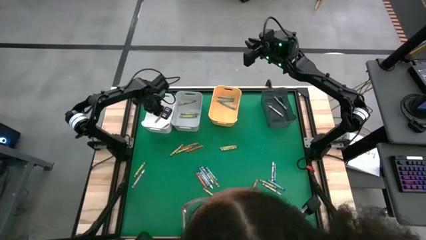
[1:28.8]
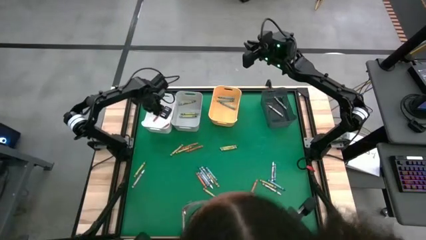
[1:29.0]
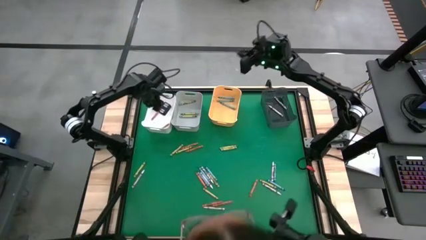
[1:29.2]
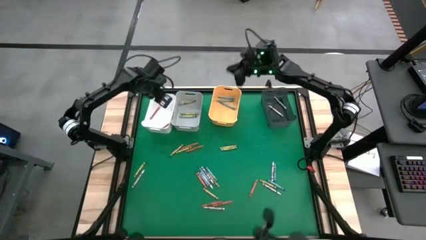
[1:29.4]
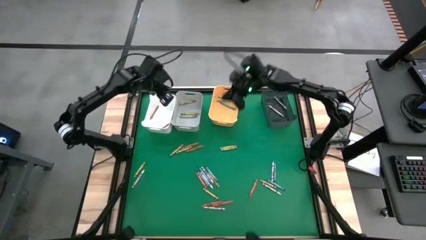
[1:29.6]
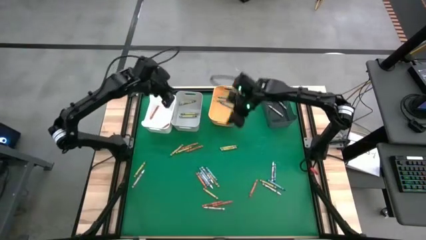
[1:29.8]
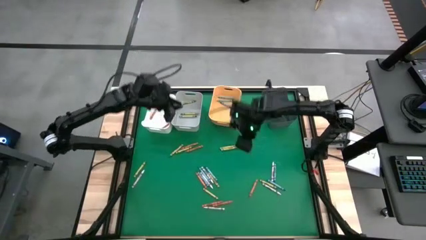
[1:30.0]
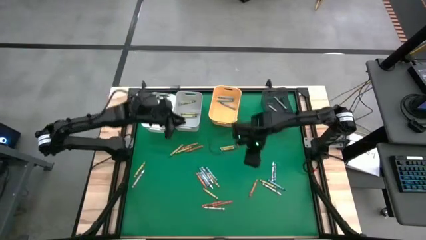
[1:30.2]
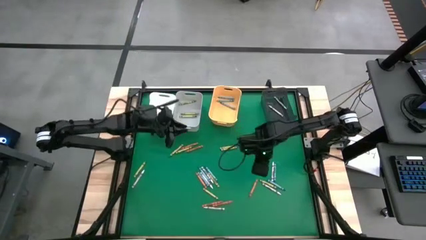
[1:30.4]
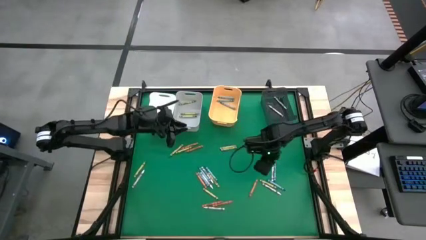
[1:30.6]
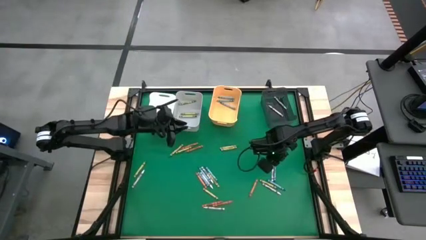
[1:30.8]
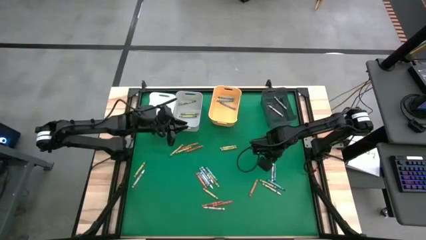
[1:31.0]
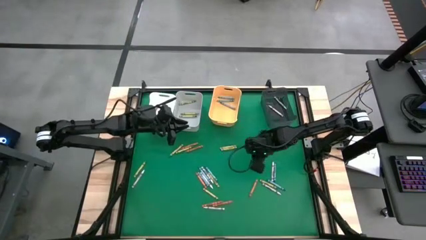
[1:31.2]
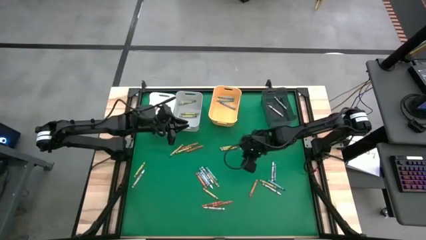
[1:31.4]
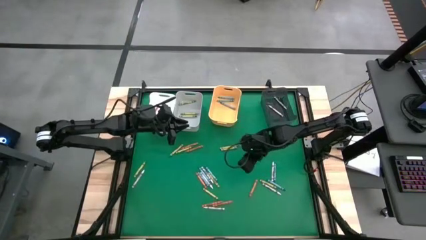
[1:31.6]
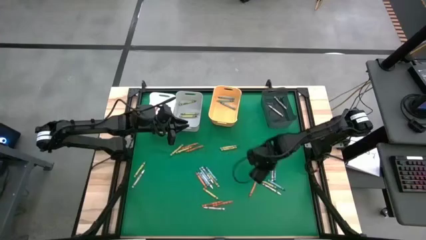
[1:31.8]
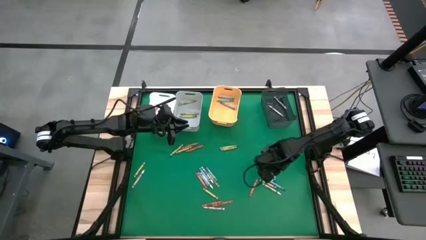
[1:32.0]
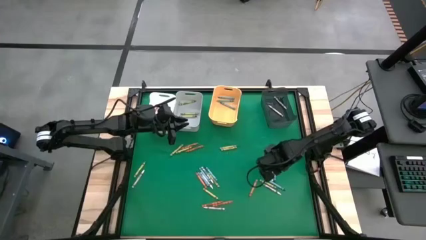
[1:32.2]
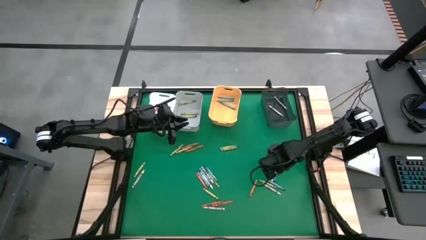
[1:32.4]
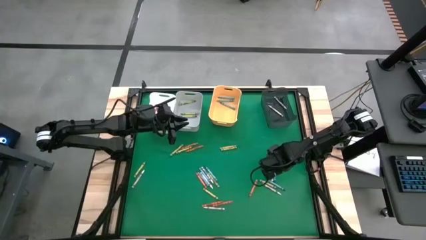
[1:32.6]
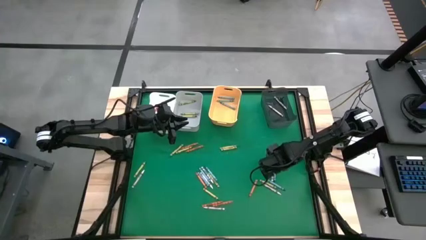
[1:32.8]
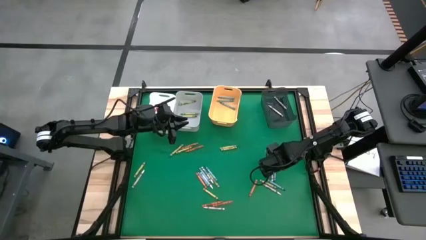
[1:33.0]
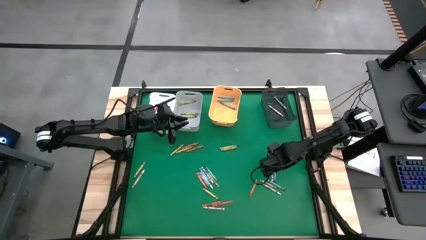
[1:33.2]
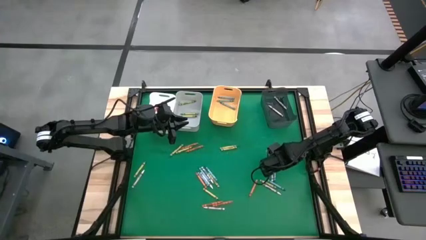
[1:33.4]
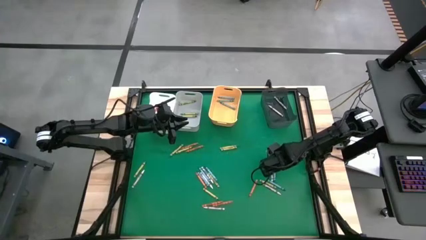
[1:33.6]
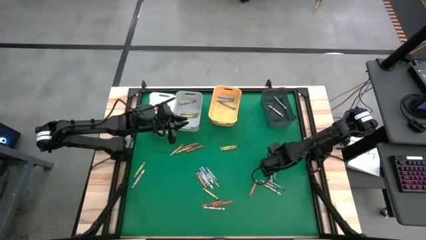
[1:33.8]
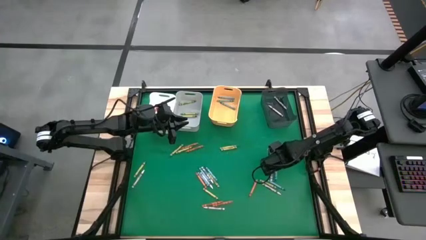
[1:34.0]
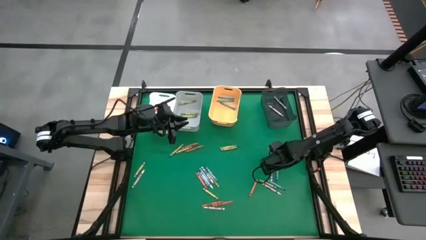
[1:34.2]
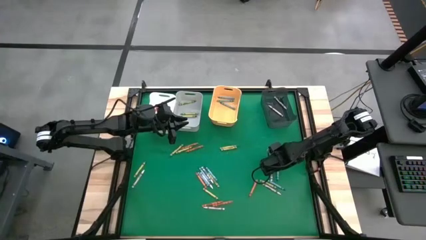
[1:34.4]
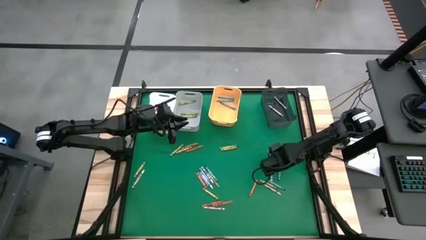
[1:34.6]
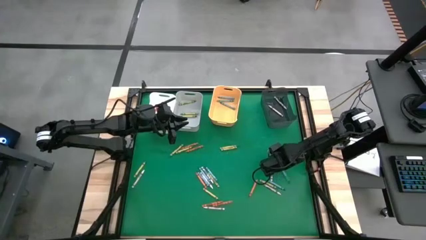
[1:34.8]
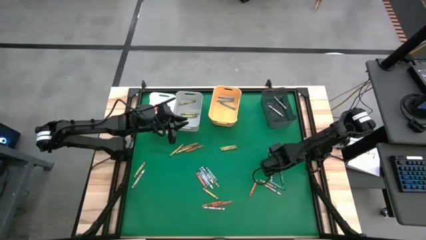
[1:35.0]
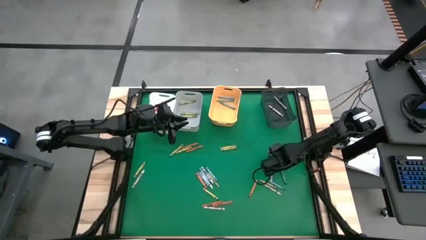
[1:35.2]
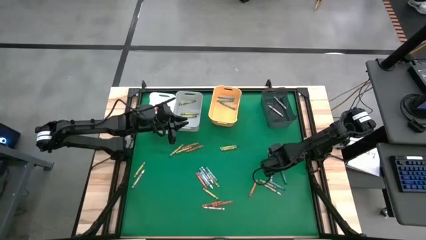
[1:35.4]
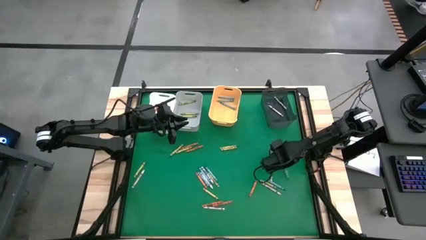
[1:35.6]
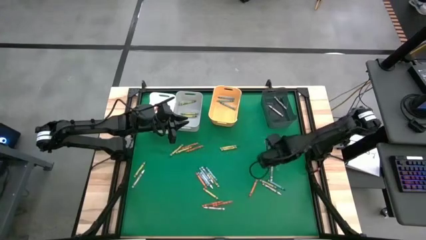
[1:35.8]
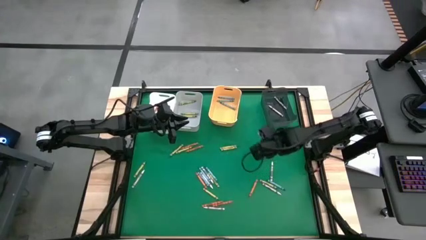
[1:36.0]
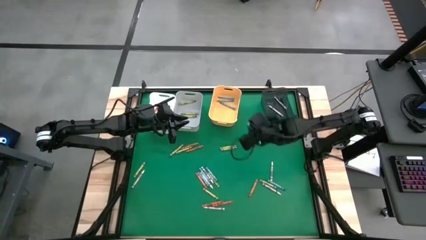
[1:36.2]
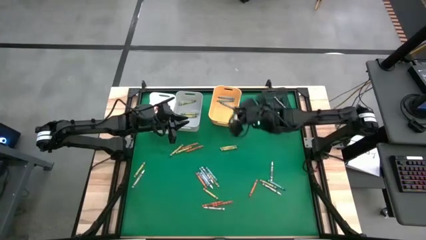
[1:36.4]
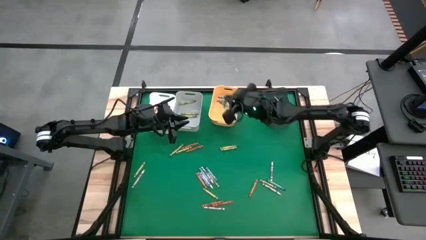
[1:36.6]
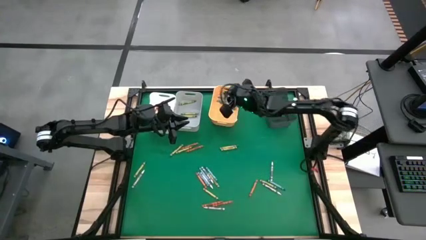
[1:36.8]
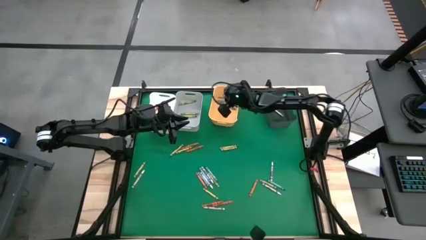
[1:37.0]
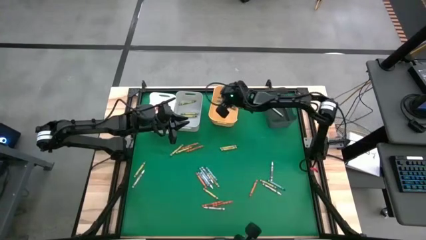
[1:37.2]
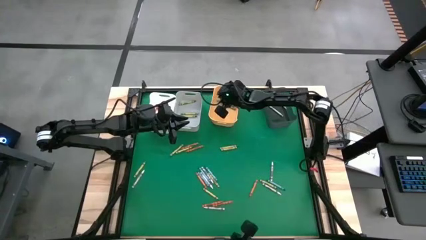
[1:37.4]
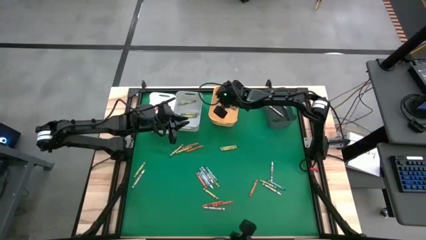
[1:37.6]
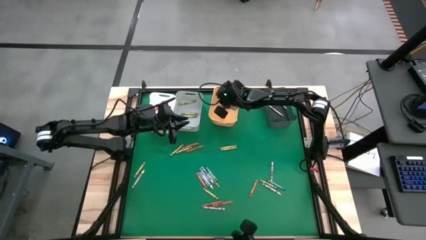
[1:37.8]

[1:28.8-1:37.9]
Task: Sort crayons
Put the blue crayon into the yellow bin

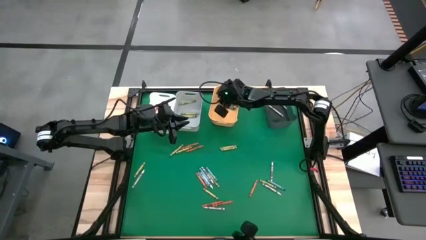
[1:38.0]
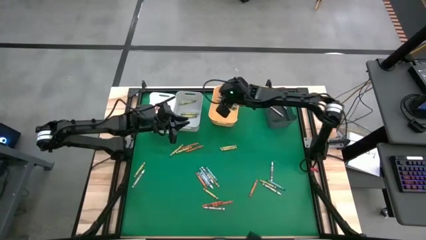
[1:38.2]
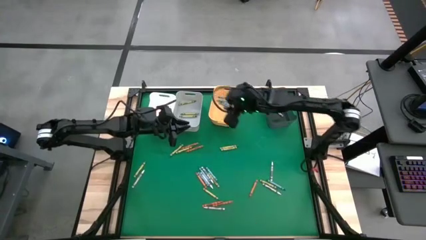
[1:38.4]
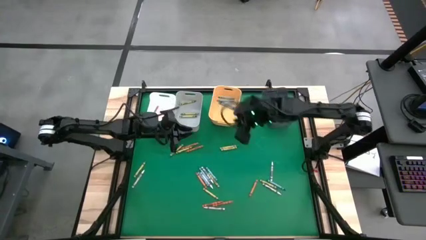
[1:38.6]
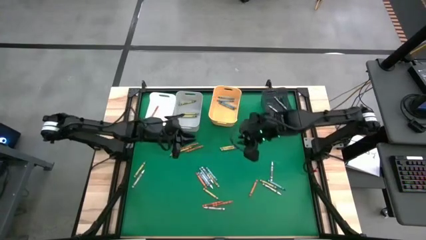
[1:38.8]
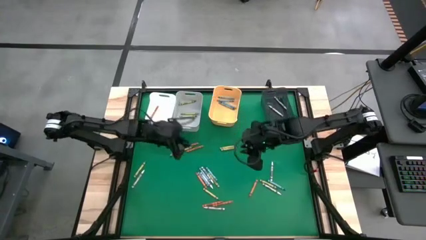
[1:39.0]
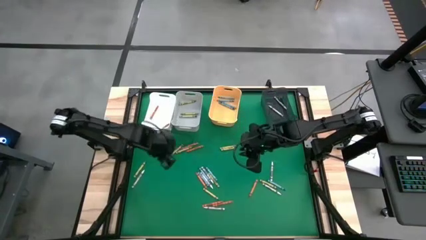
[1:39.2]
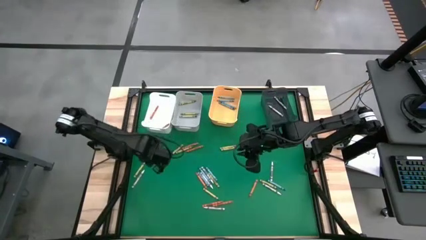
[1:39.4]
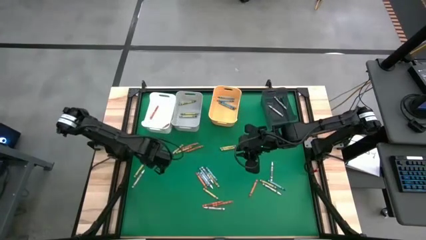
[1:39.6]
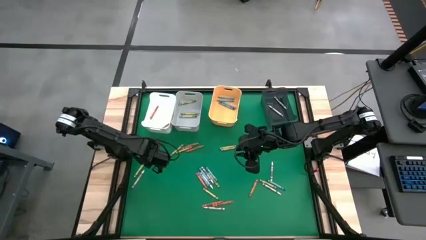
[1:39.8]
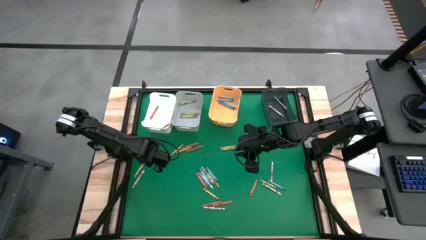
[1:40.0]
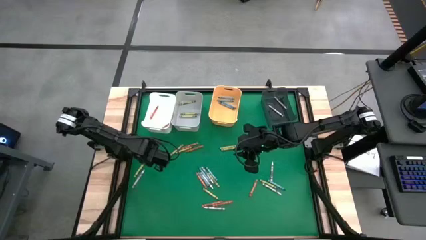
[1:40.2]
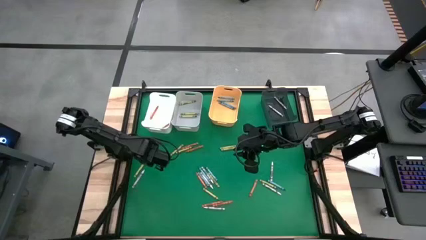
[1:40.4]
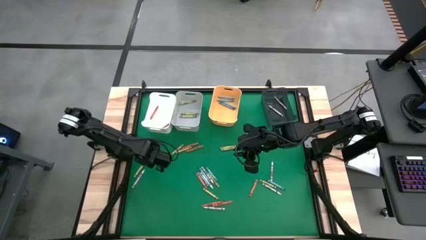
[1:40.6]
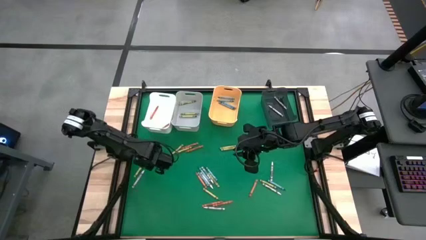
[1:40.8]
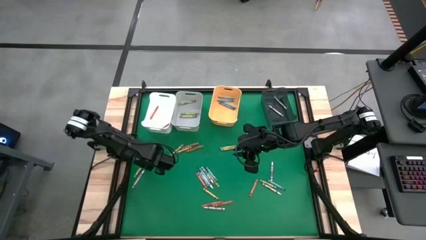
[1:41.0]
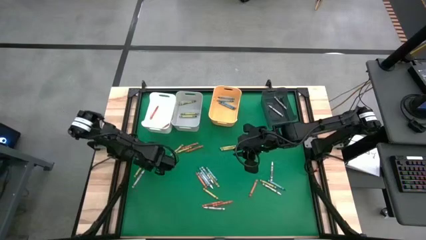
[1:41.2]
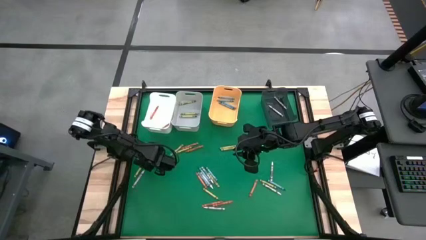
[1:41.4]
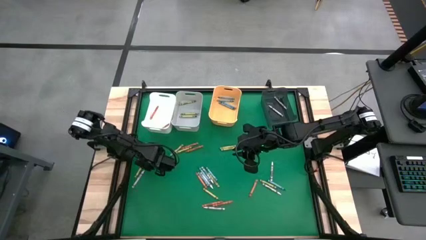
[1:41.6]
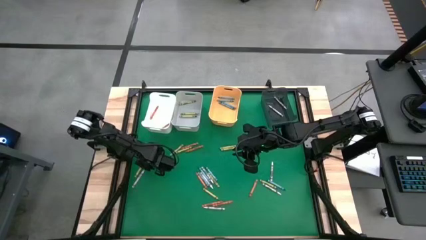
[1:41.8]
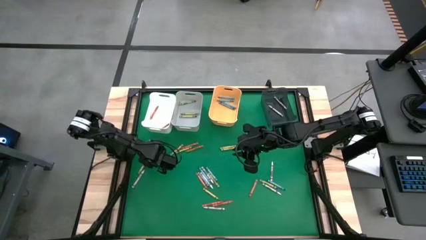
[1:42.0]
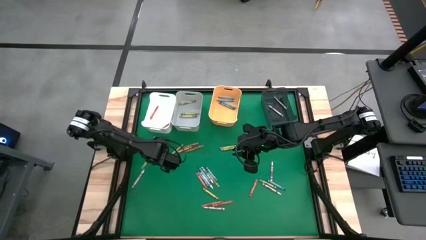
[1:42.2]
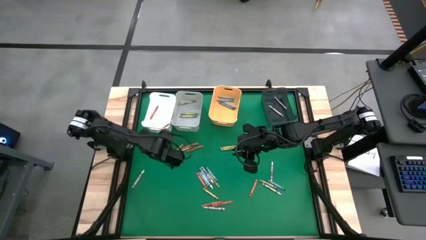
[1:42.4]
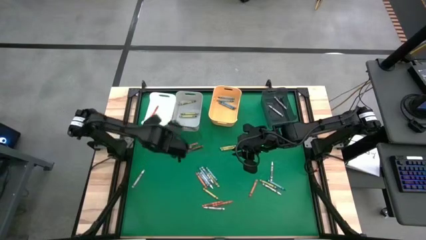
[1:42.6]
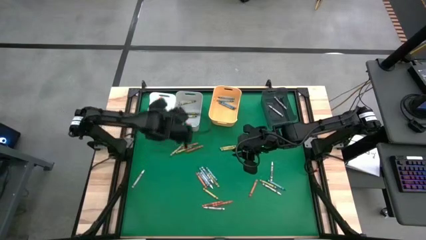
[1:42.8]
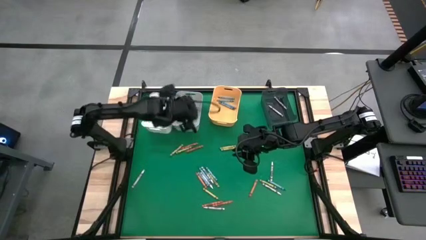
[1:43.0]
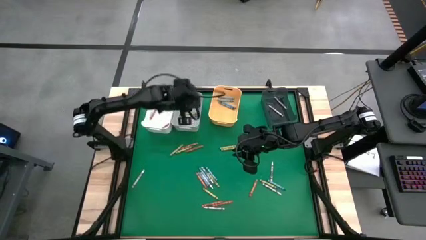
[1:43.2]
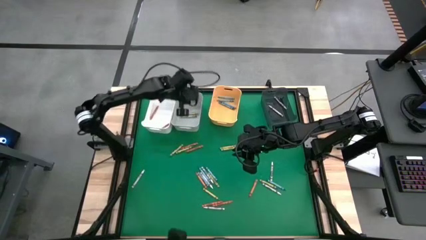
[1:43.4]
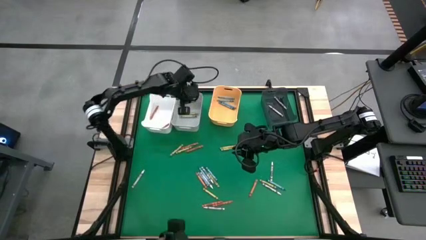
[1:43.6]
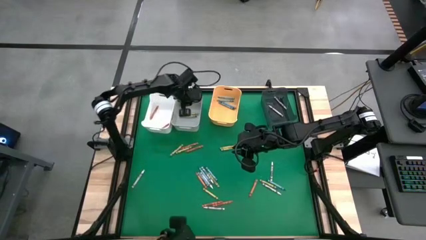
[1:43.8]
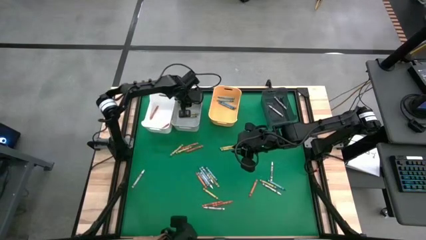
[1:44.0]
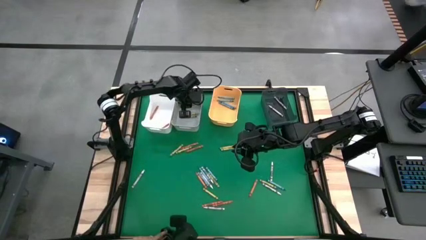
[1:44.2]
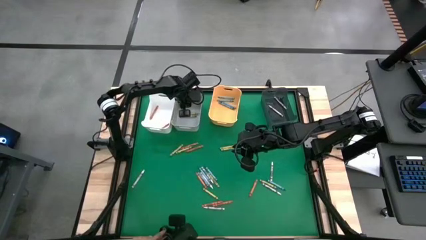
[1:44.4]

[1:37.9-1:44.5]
Put the green crayon into the gray bin
